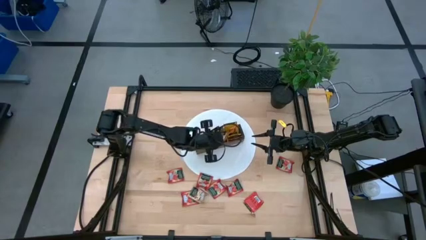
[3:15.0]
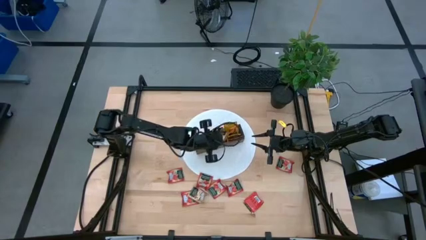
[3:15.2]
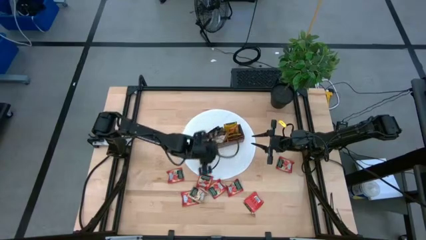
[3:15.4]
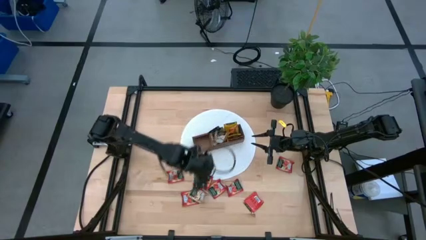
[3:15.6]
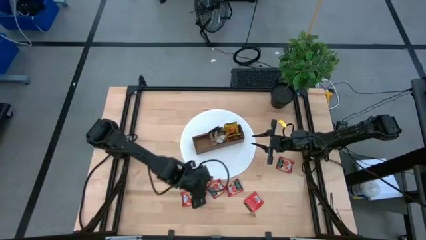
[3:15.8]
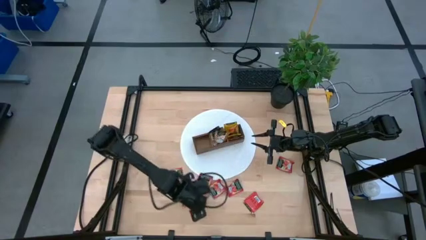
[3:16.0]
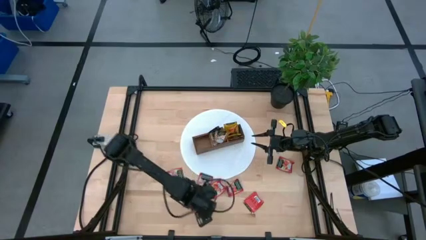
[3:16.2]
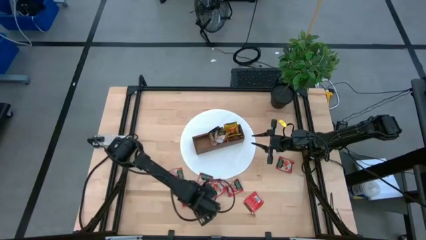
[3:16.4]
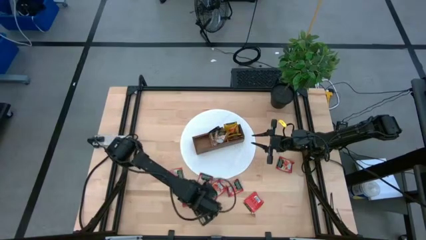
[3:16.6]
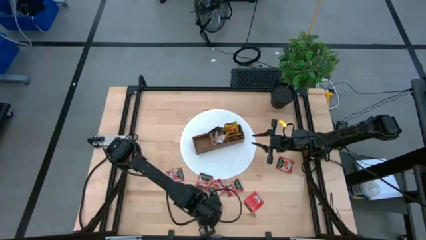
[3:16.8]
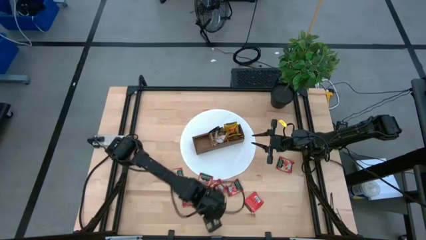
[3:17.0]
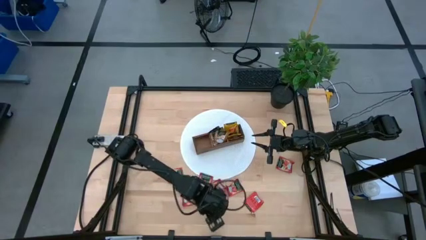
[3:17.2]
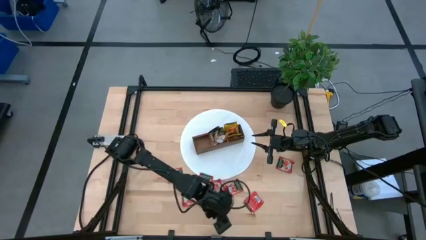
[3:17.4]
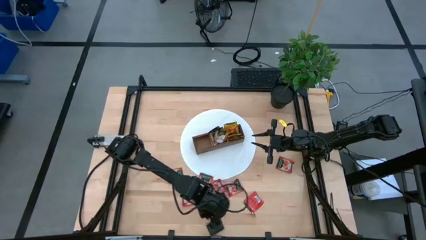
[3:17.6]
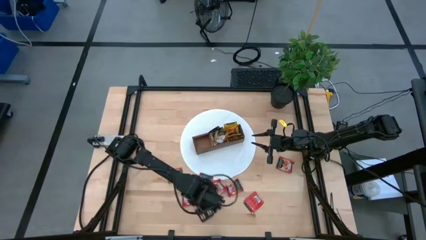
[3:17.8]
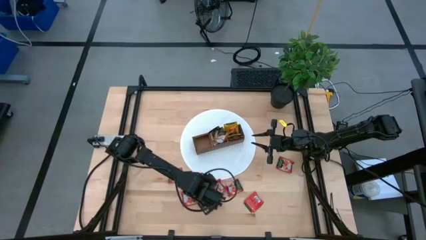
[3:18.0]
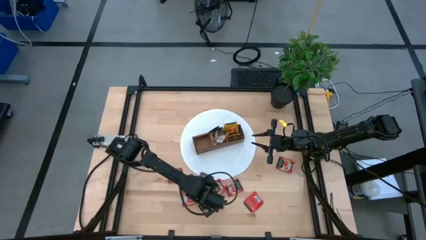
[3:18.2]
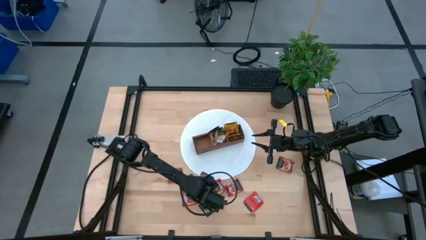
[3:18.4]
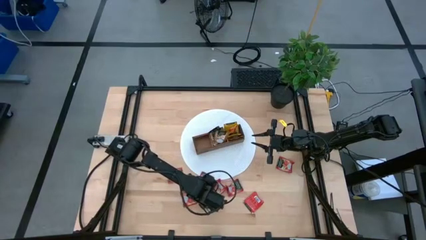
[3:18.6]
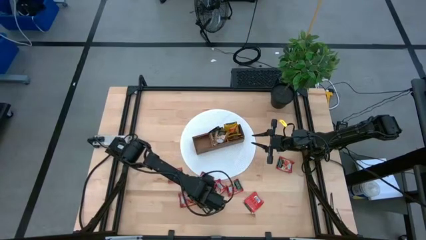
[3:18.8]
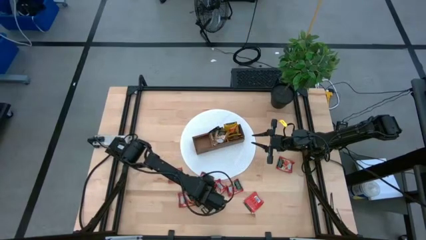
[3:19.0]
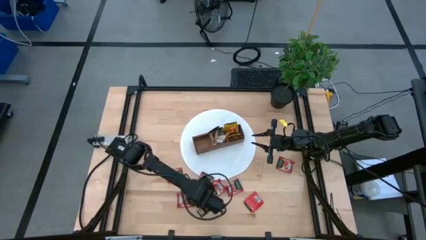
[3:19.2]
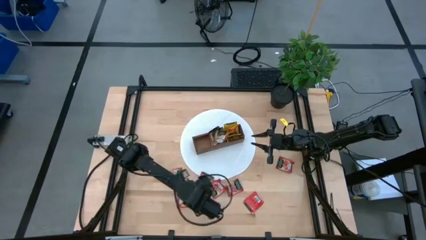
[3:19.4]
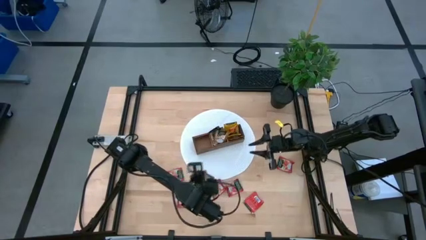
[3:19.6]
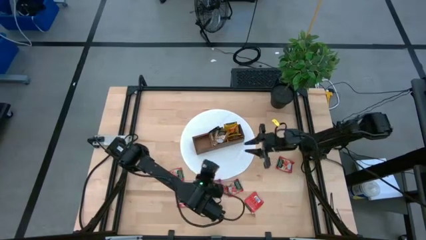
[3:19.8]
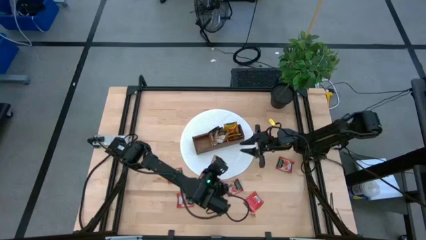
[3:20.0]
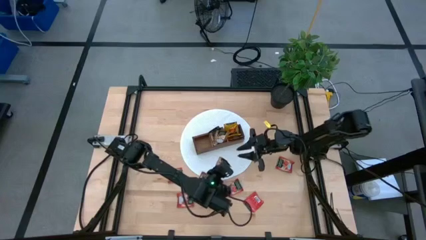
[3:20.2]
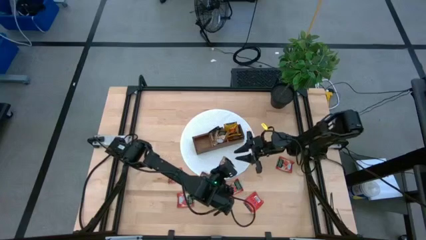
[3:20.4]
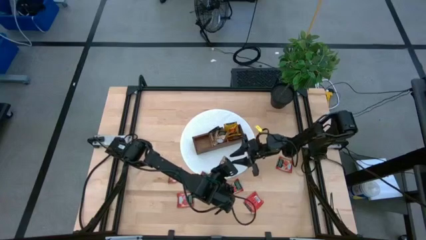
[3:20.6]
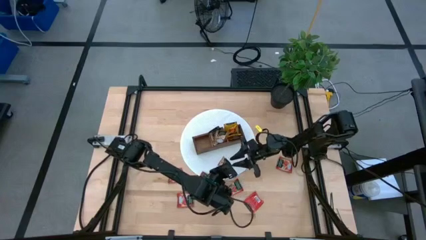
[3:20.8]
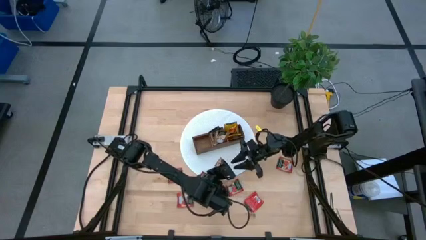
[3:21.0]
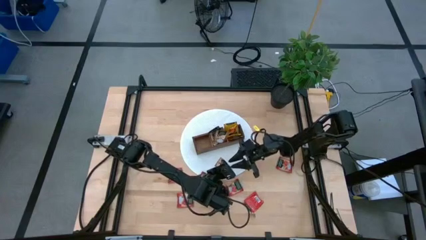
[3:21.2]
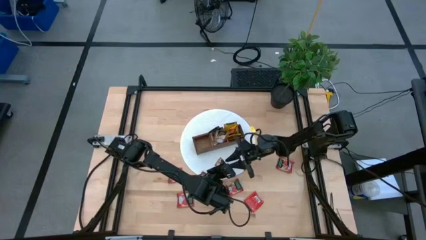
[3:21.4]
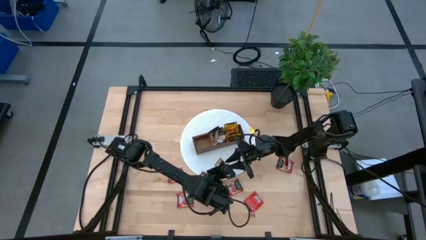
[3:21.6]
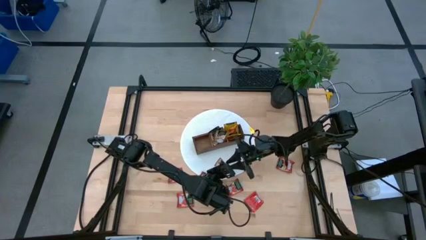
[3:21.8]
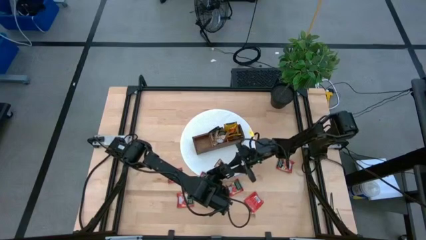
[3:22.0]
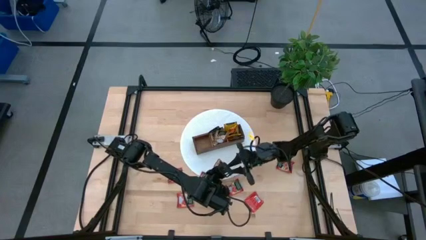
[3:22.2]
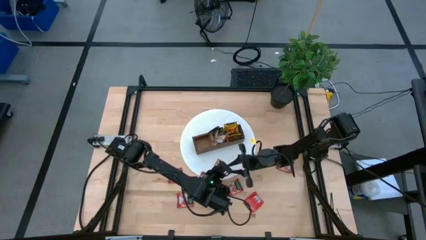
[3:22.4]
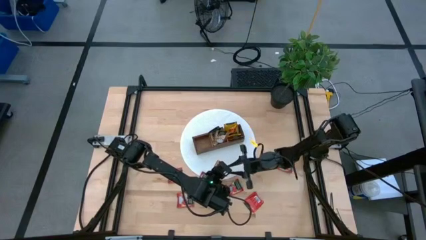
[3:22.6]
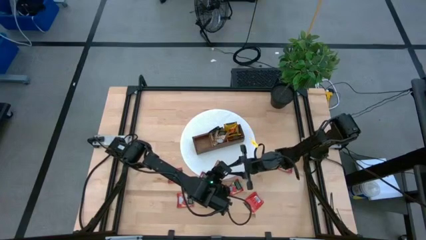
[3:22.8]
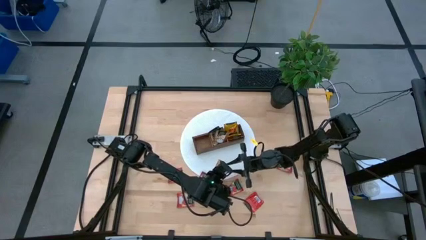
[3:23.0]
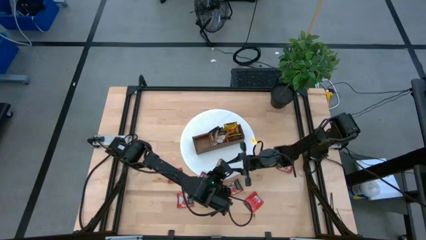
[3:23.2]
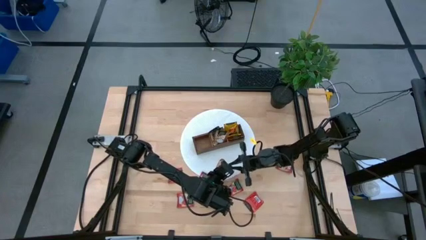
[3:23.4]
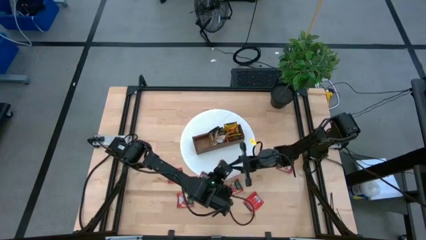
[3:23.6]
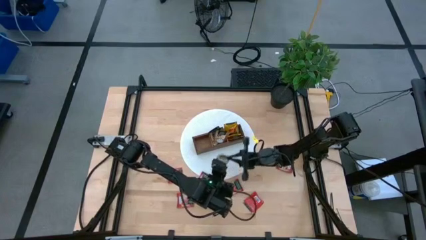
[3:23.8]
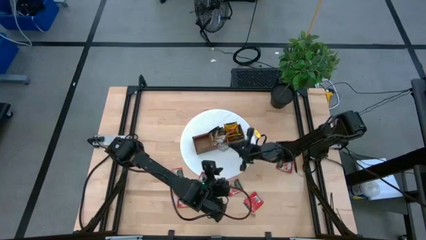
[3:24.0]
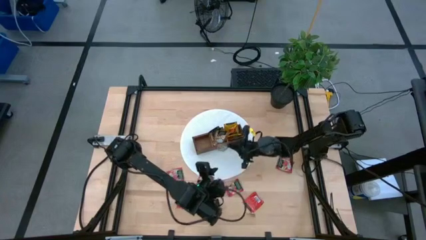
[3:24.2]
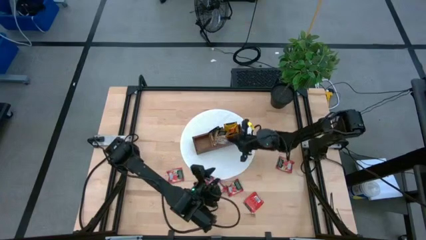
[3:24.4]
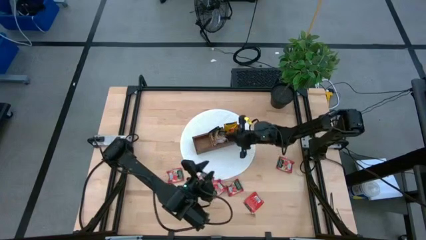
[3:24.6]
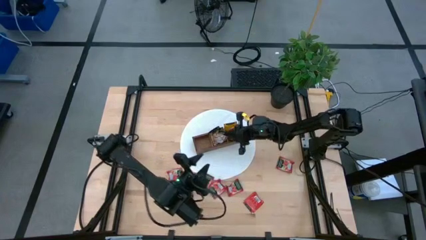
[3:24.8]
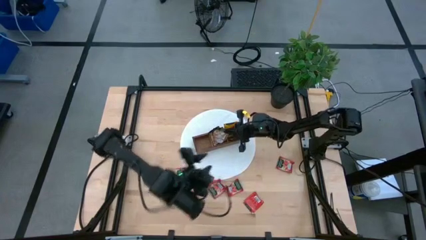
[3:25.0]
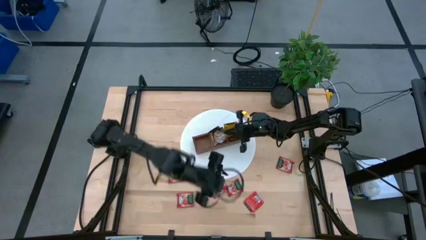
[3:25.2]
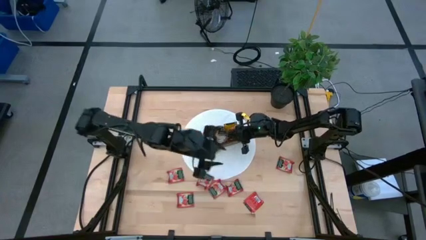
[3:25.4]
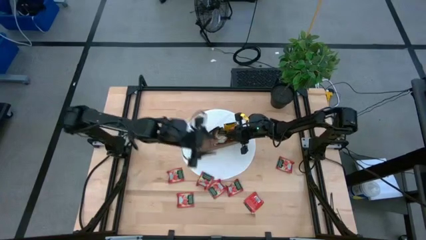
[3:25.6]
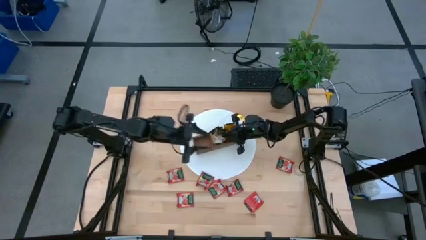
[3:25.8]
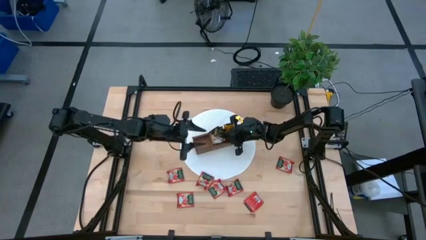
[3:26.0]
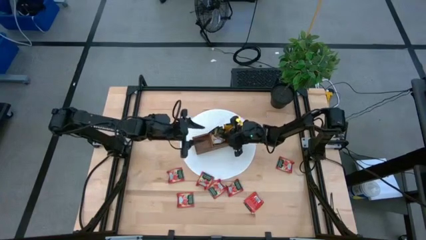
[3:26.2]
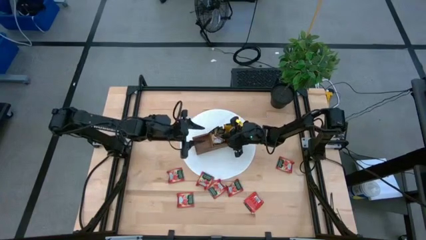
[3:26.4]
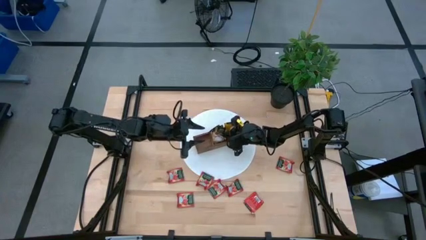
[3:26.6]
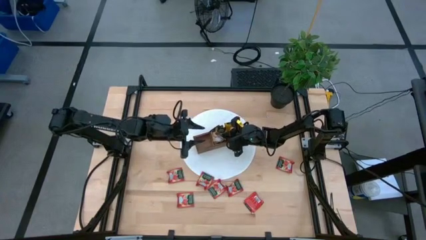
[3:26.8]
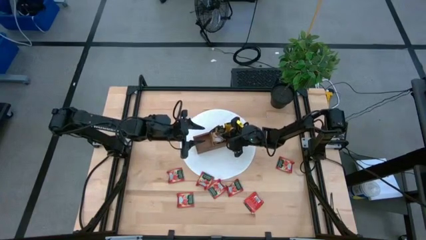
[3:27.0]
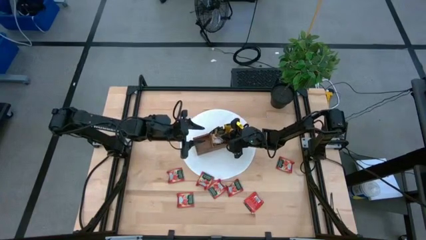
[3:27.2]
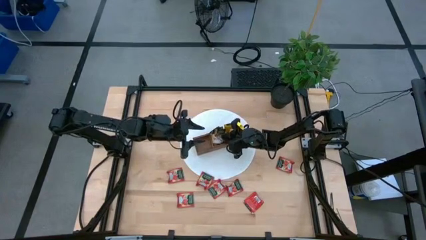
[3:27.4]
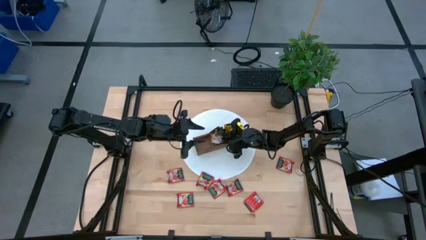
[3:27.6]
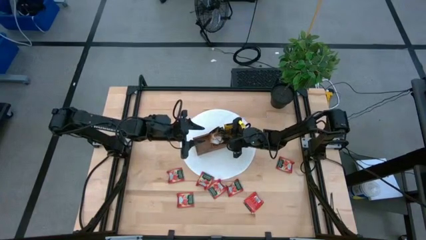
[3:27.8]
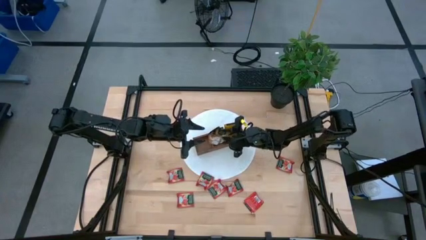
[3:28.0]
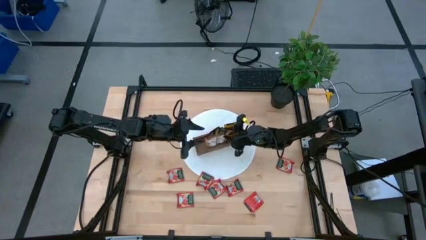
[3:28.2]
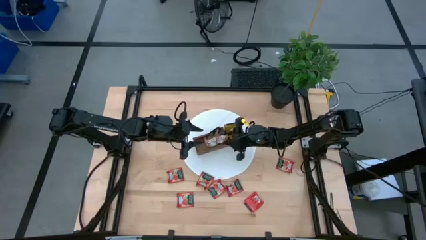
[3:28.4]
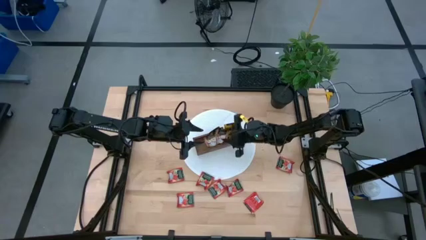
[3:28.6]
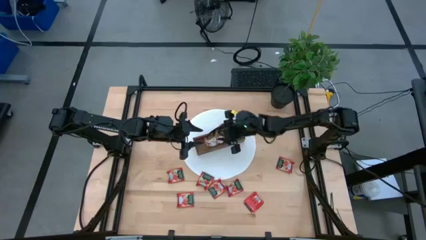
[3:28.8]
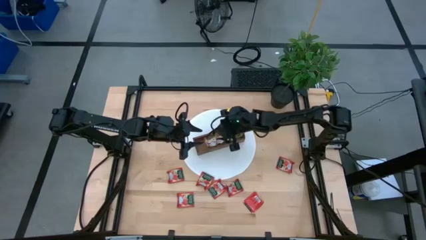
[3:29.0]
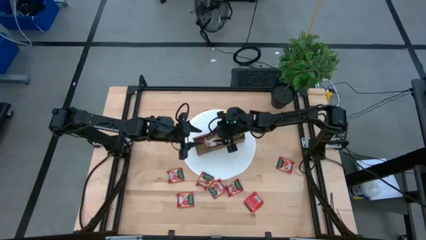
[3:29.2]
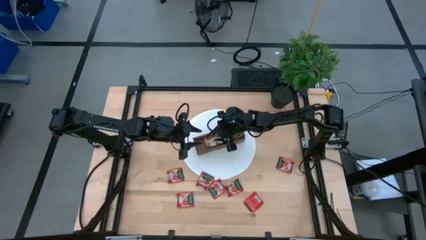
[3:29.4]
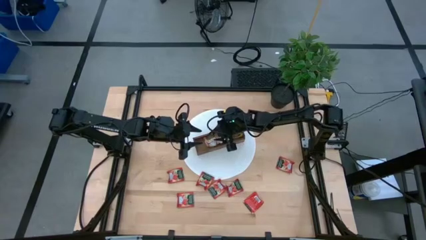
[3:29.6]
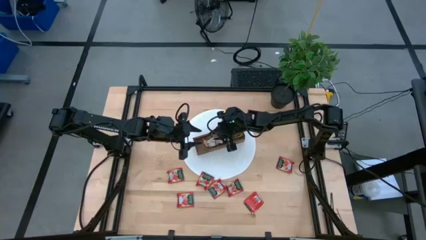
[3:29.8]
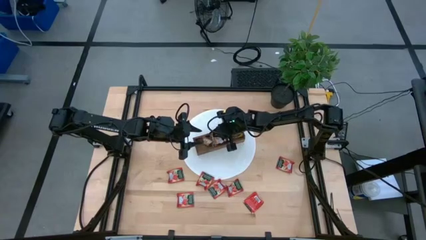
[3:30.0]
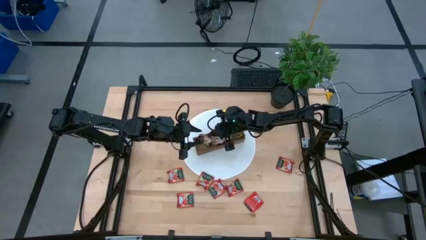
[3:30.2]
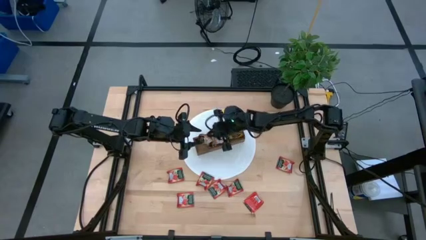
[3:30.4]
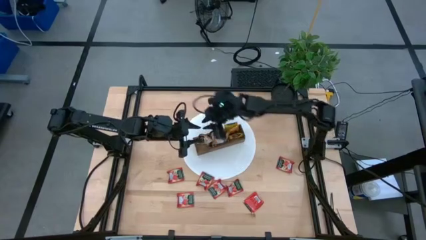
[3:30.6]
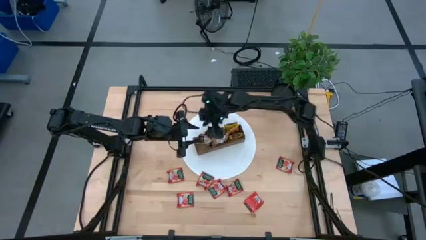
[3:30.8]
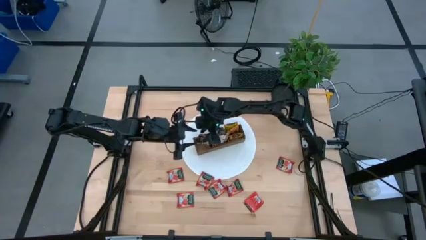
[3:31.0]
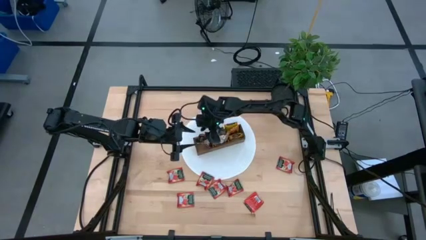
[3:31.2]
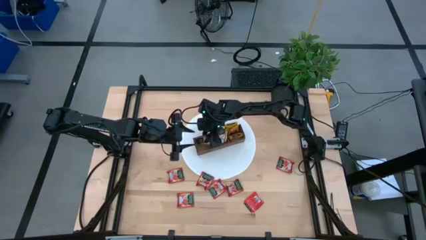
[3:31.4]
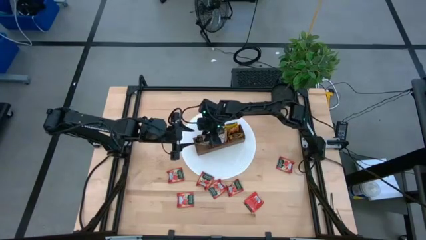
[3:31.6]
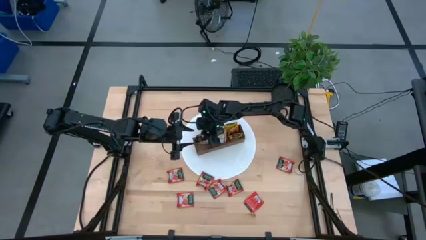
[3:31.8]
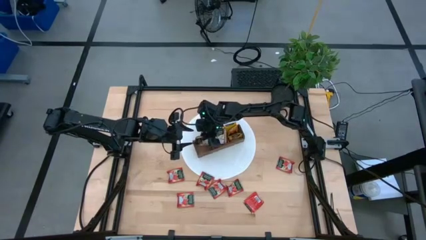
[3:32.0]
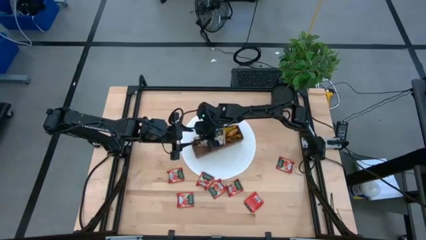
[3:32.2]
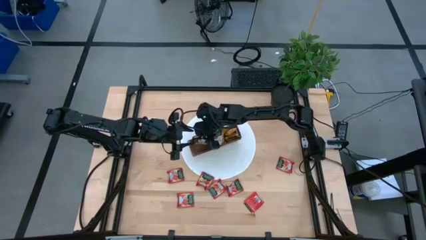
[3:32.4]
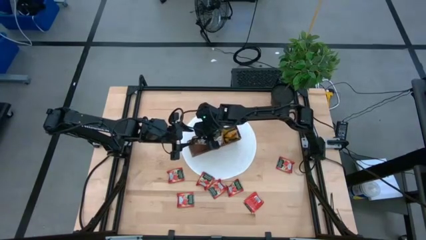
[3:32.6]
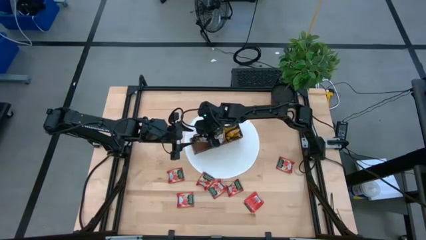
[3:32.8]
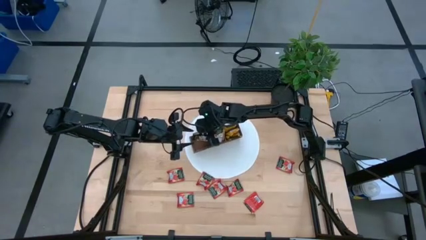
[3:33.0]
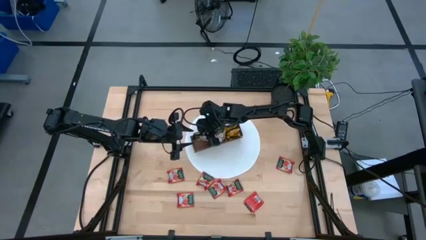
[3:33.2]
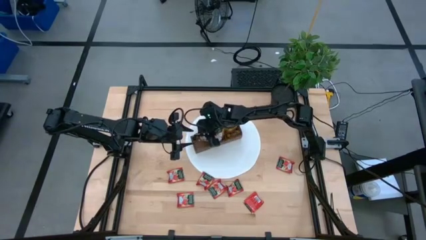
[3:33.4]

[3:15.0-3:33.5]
Task: Pick & Place Tea
Put the brown tea bag into the middle section of the wooden organizer
